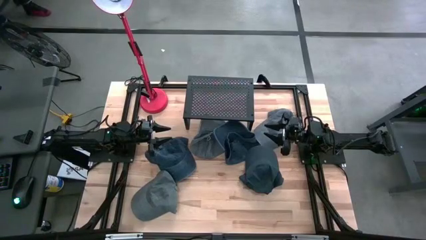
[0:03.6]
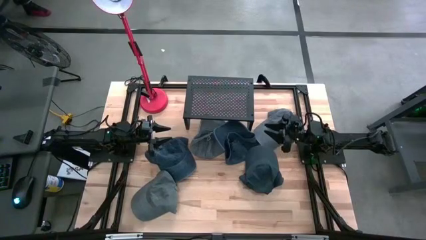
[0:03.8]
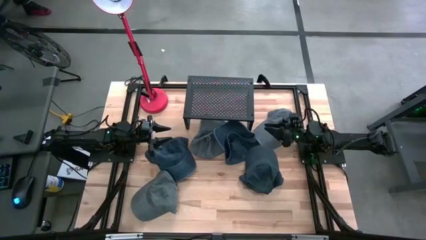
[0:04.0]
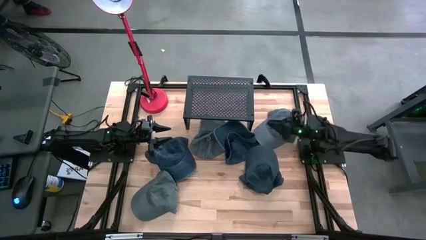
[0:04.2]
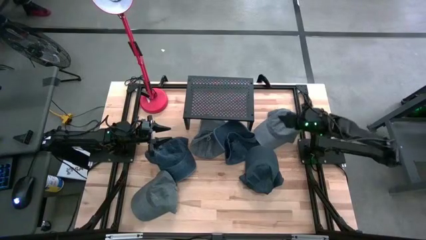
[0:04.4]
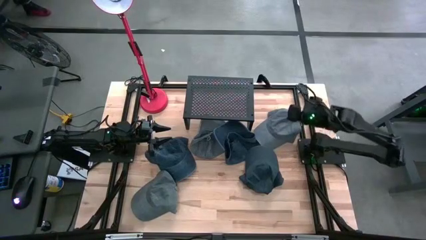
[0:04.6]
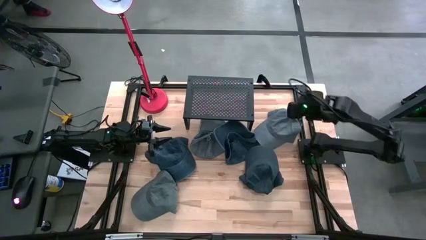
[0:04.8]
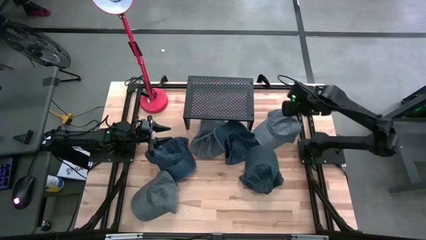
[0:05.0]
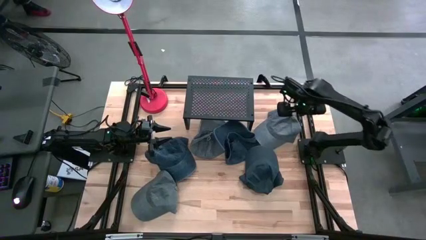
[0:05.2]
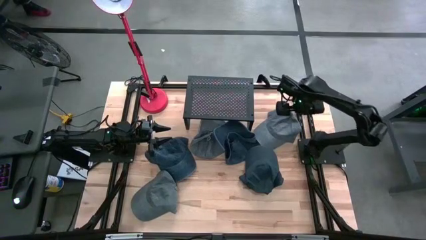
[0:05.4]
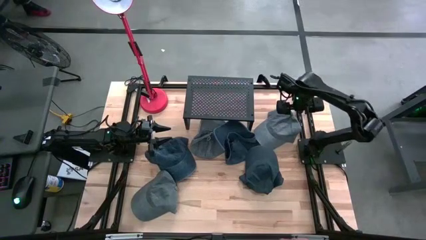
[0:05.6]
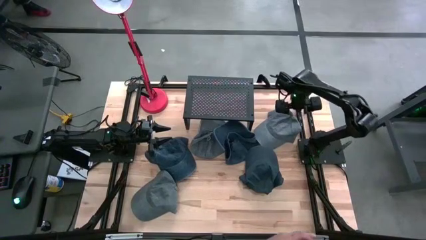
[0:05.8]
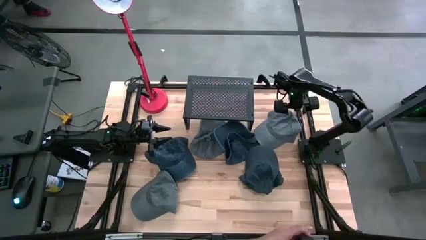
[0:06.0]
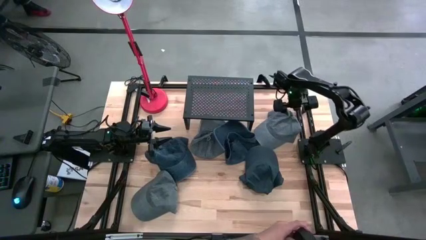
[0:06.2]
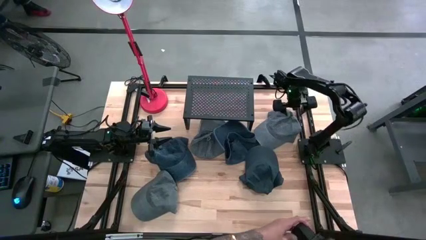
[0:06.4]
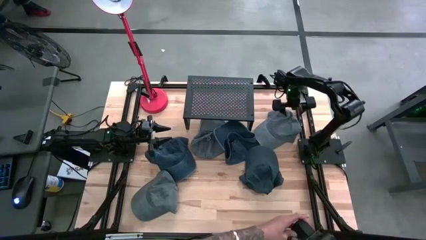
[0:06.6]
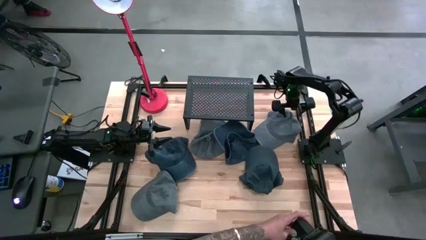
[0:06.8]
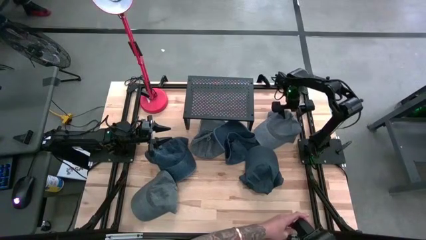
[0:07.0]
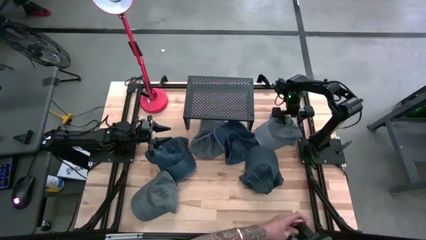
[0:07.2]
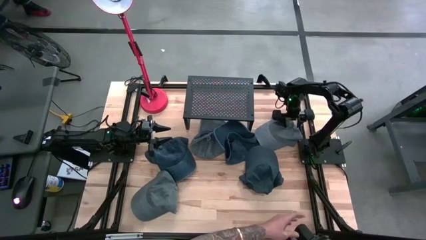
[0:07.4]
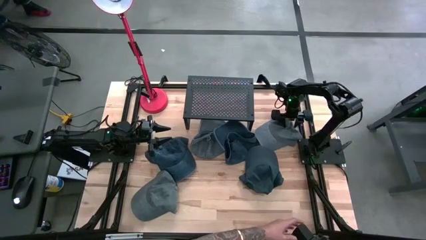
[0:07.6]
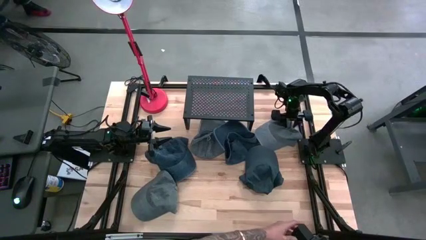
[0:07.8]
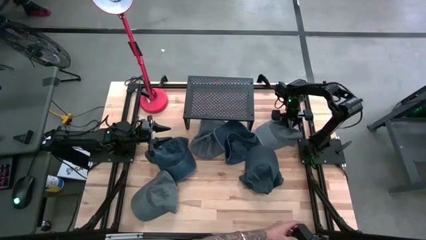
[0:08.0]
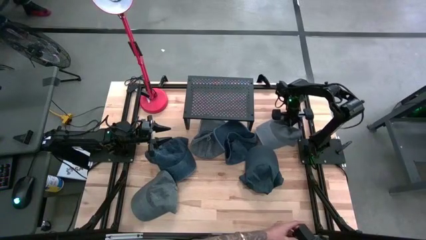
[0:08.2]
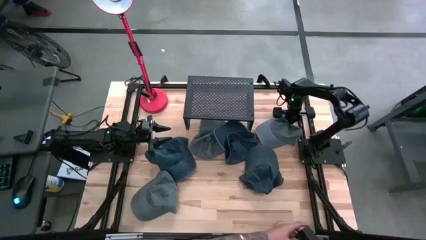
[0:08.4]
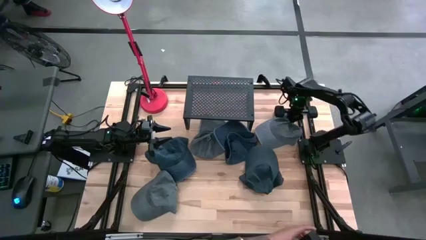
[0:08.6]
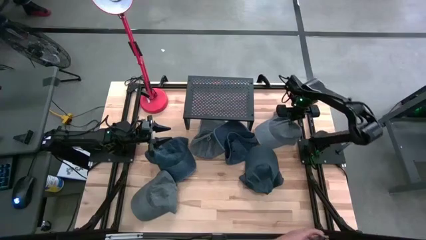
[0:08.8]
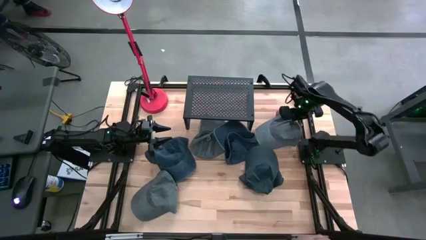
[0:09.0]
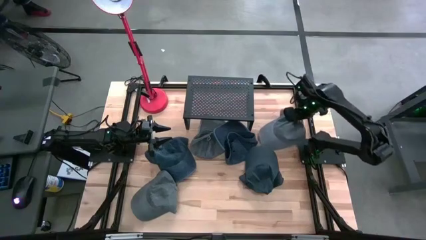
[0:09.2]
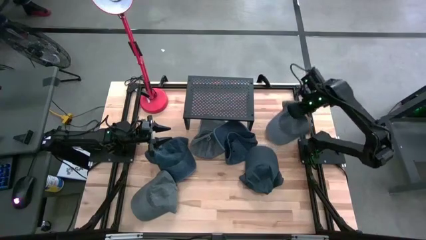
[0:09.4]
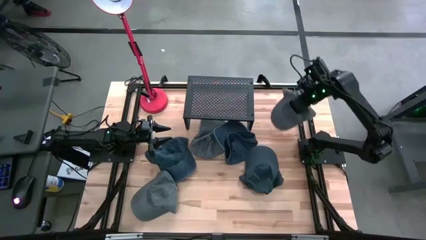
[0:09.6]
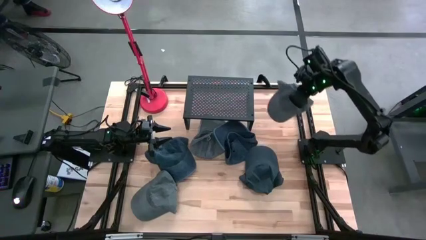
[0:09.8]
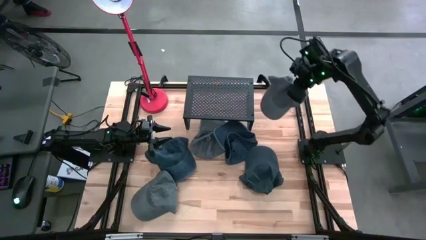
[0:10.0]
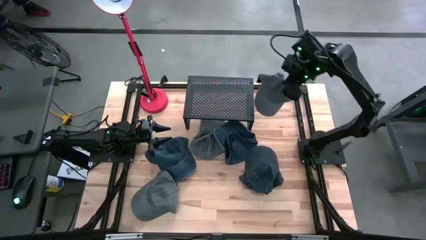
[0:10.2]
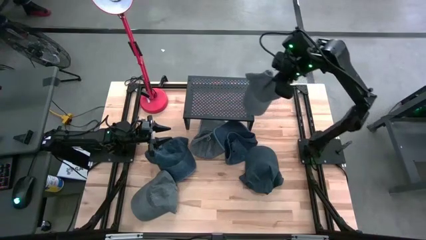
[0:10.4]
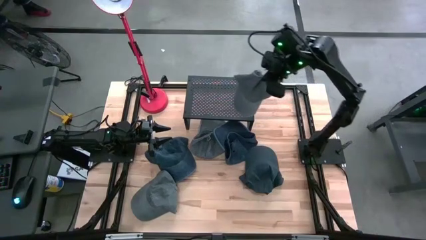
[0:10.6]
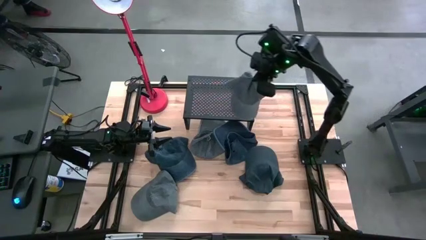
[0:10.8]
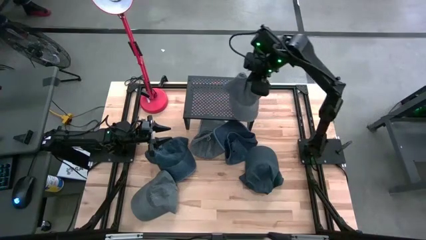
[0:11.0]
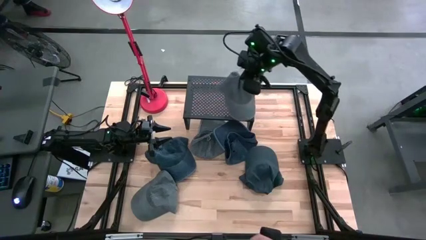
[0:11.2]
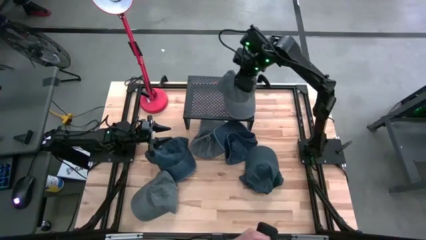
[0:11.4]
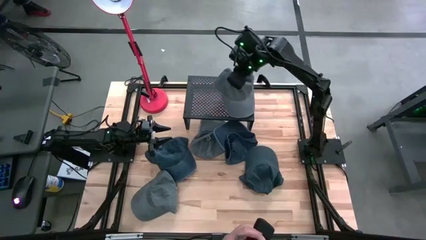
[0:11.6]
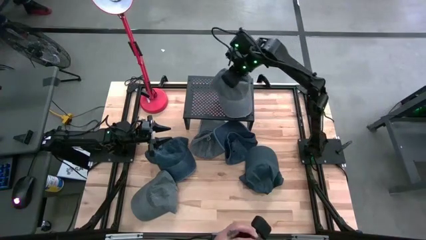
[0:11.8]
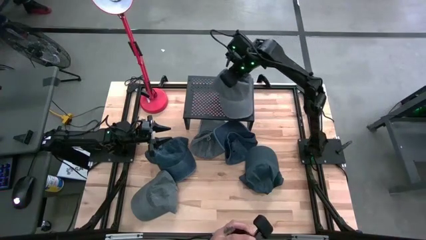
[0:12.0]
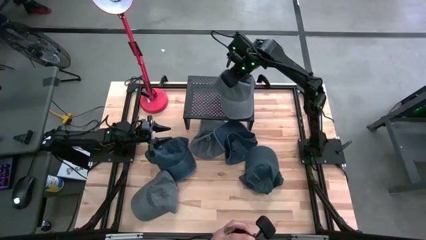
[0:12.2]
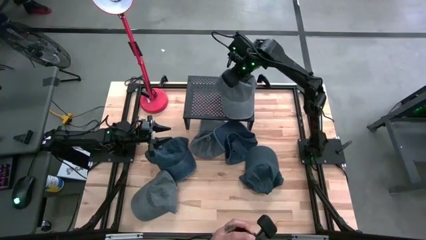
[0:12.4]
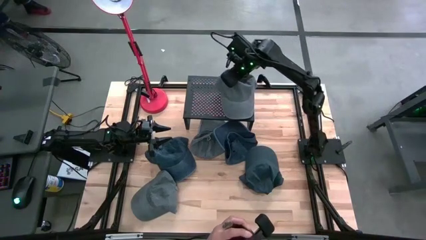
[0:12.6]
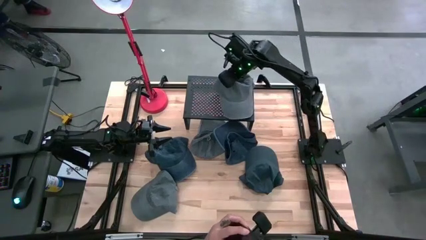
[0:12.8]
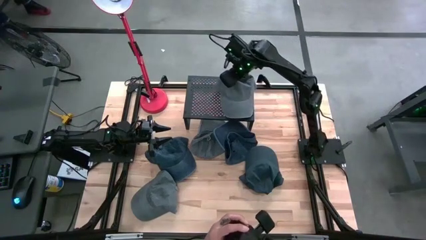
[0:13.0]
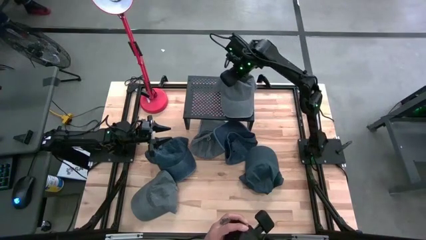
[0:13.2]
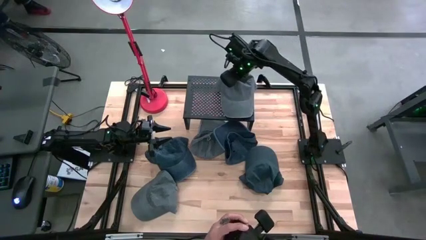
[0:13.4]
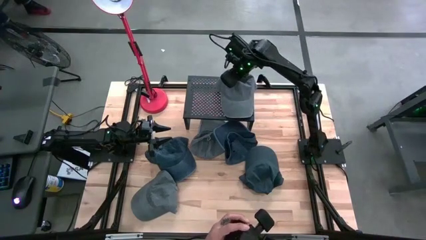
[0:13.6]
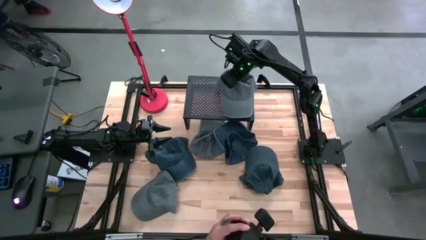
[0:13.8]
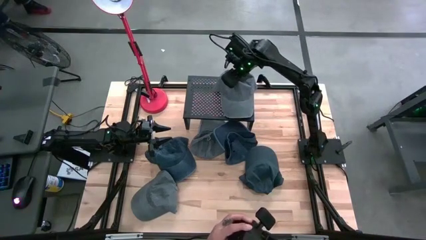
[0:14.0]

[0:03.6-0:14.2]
Task: Pick & Place hat
Put the top right gray cap on the shelf

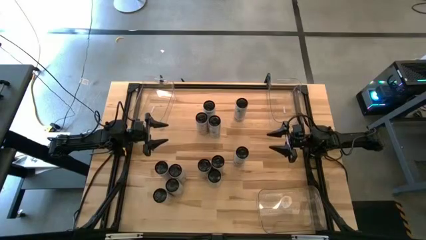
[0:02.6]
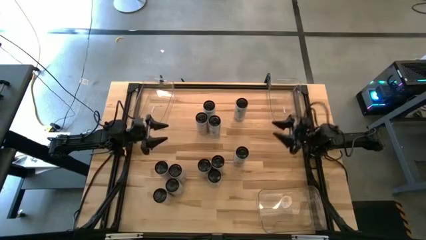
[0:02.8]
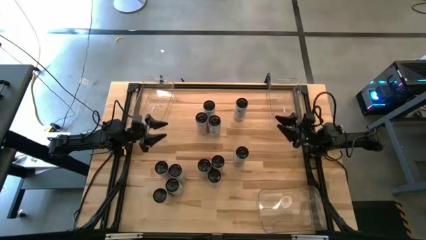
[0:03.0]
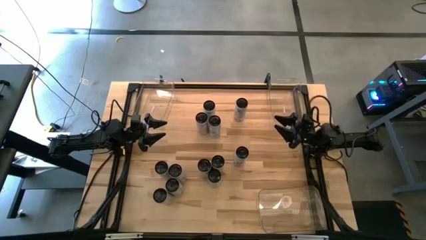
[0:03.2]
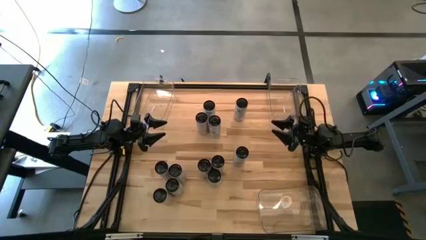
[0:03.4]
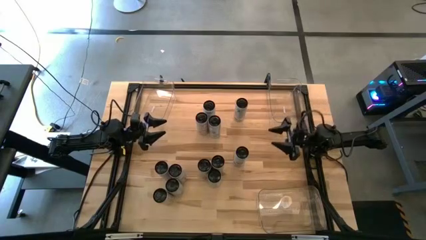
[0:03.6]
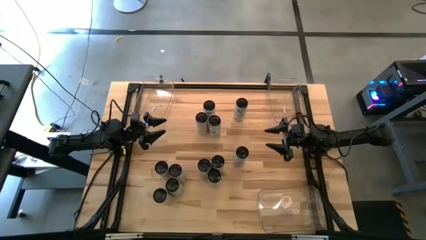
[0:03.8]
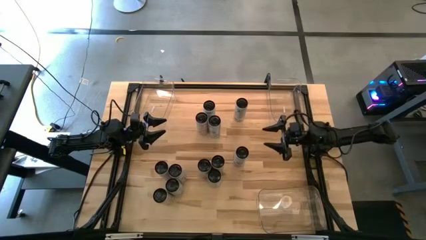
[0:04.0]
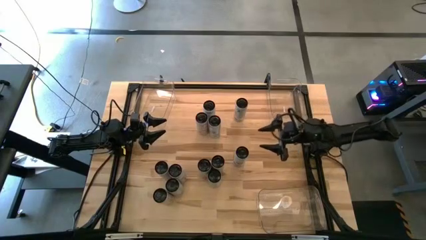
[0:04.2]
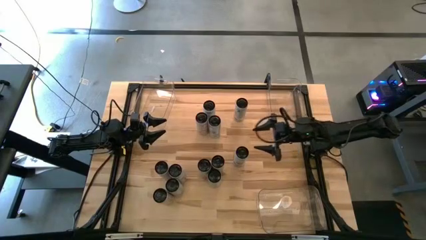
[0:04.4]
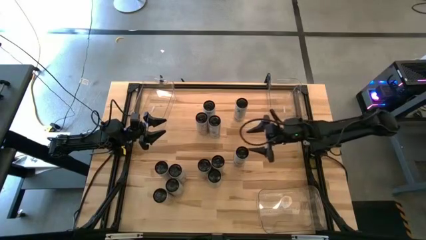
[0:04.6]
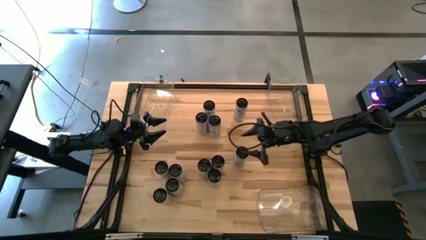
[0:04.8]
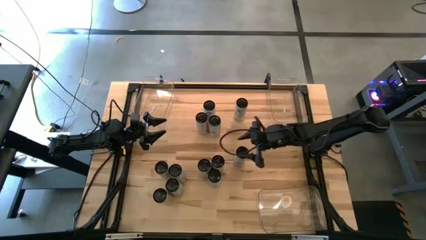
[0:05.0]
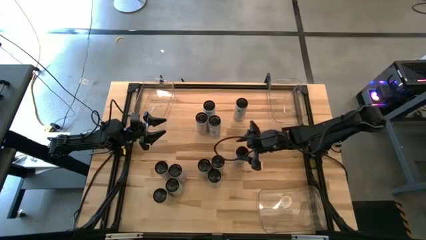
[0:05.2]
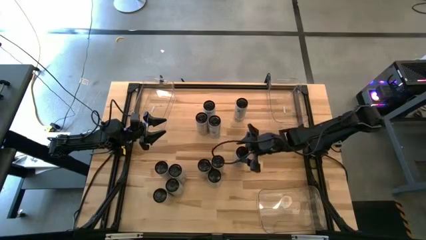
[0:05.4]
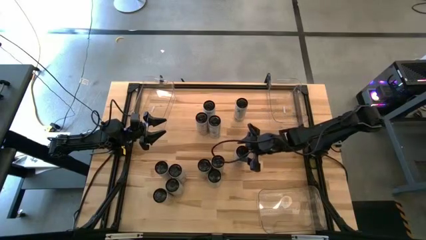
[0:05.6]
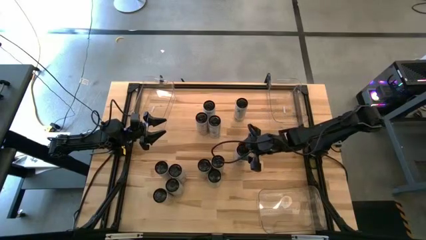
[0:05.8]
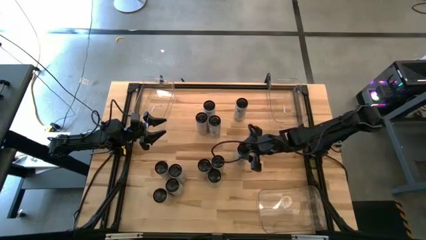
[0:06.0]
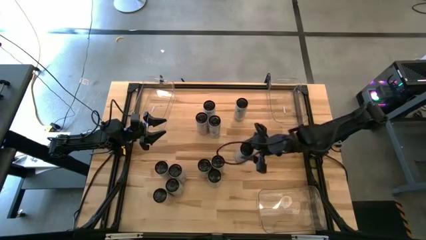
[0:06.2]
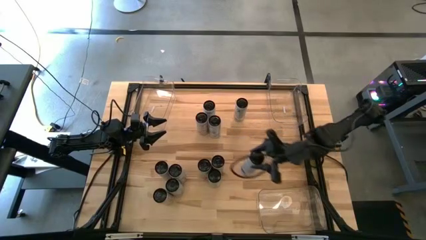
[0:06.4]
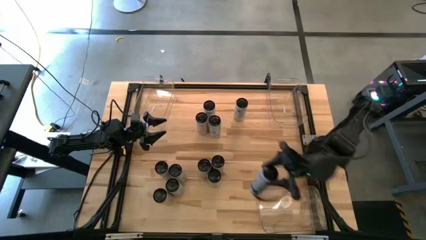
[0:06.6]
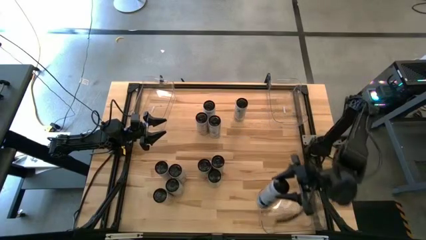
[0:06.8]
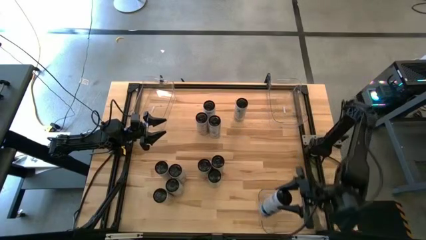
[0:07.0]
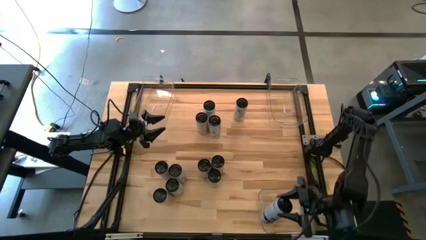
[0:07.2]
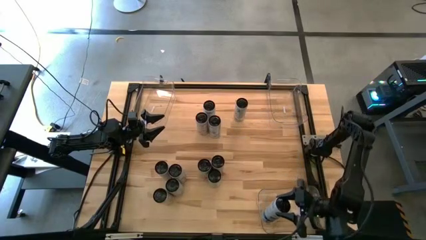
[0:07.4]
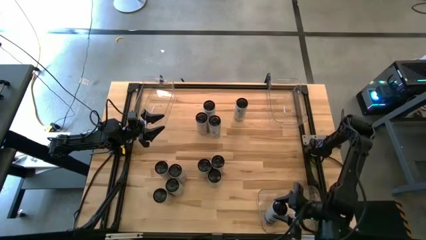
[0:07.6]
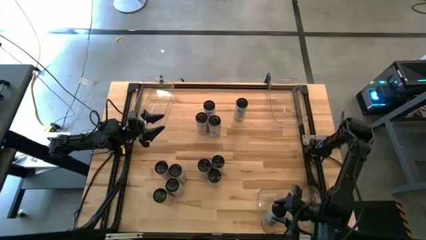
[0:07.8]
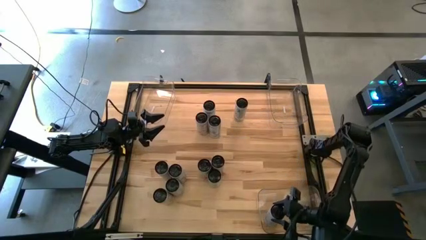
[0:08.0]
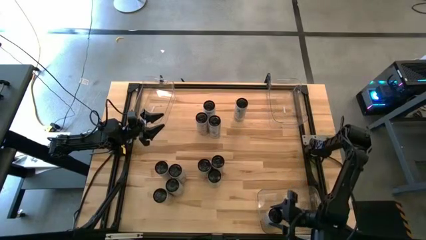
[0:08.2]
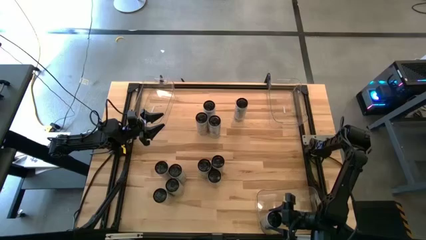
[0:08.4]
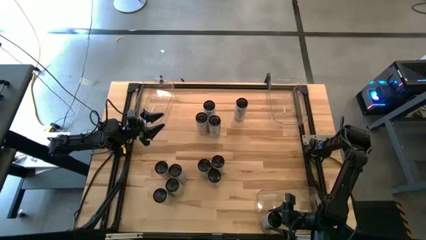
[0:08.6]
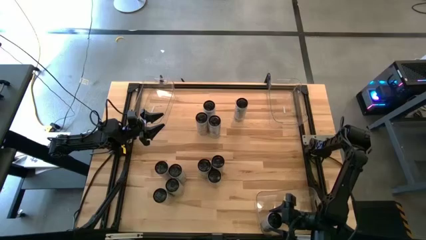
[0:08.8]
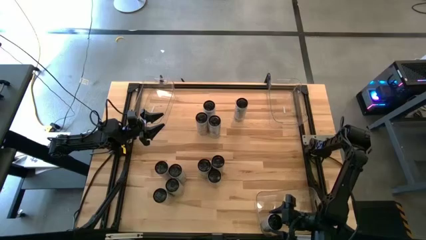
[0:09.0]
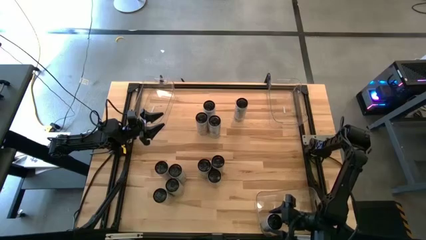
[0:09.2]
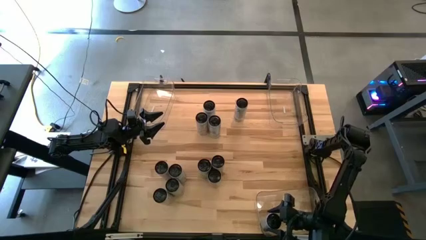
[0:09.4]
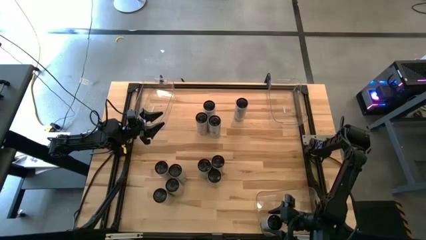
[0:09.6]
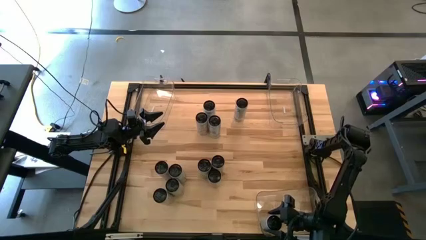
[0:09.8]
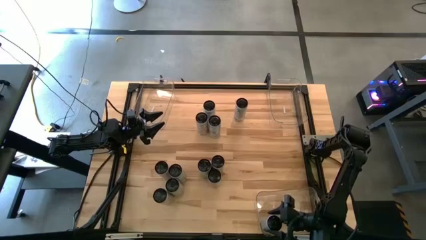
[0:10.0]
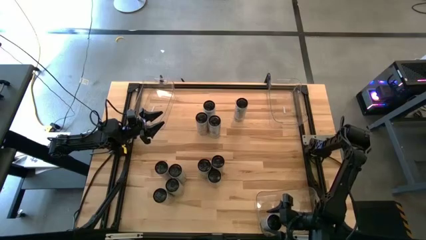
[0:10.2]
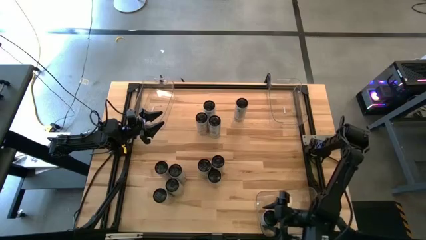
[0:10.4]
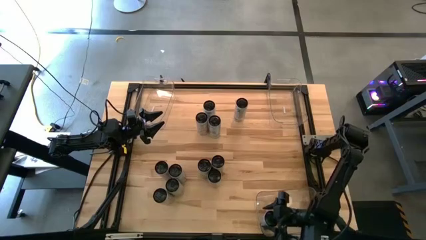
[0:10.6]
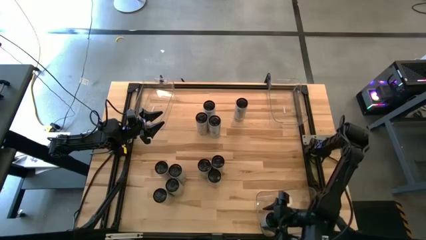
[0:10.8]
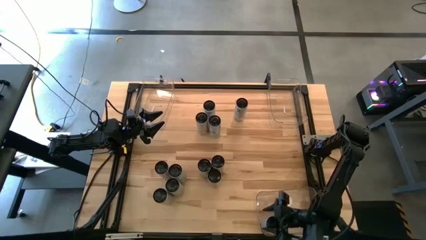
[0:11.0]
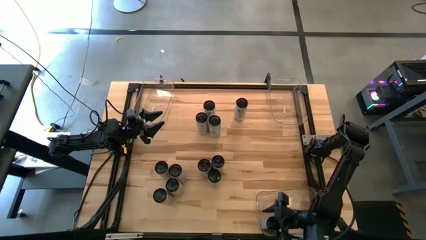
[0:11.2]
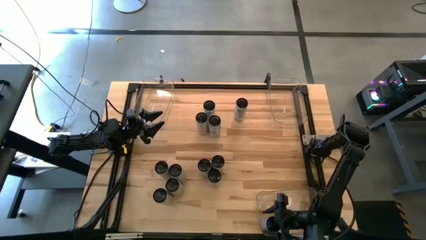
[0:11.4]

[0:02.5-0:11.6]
Task: Sort soda cans
Put the white/blue soda can into the bottom right transparent bin
